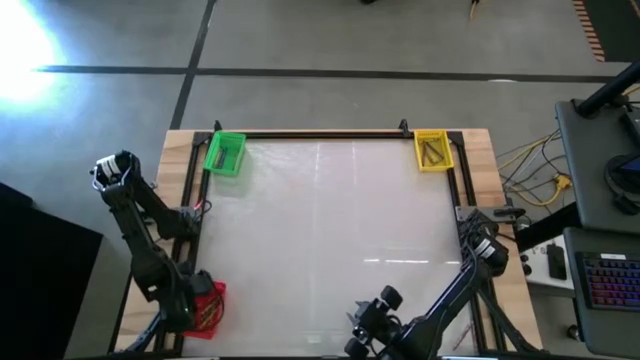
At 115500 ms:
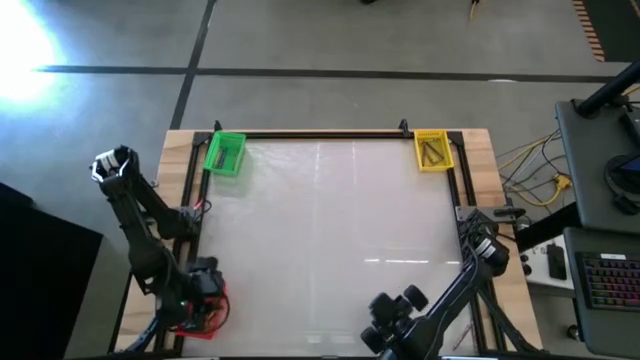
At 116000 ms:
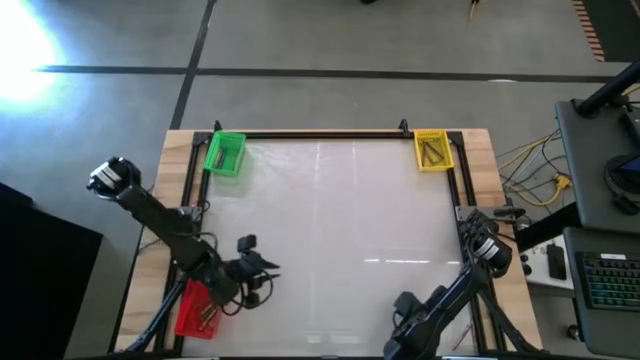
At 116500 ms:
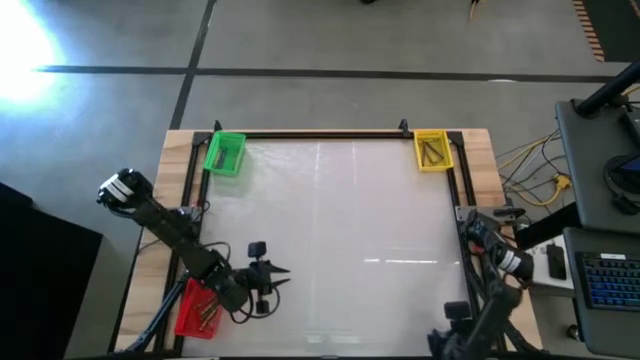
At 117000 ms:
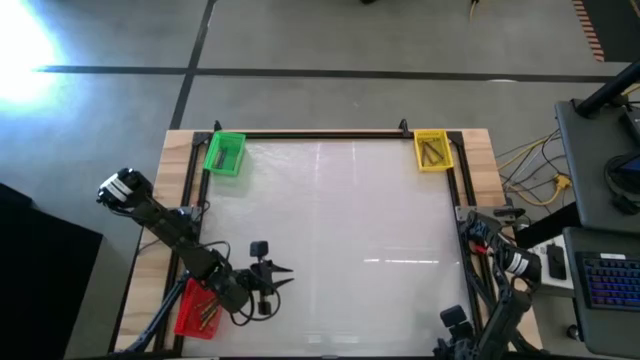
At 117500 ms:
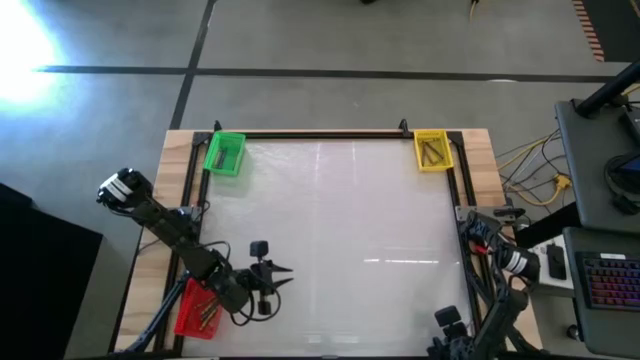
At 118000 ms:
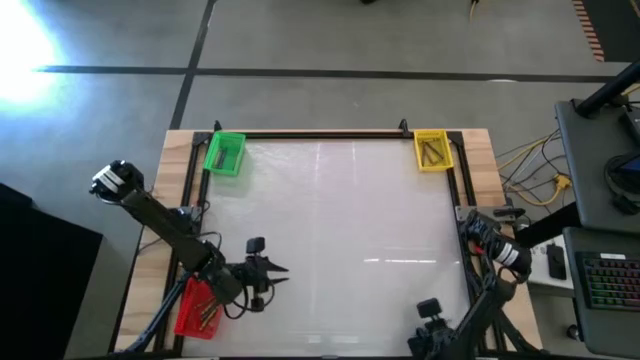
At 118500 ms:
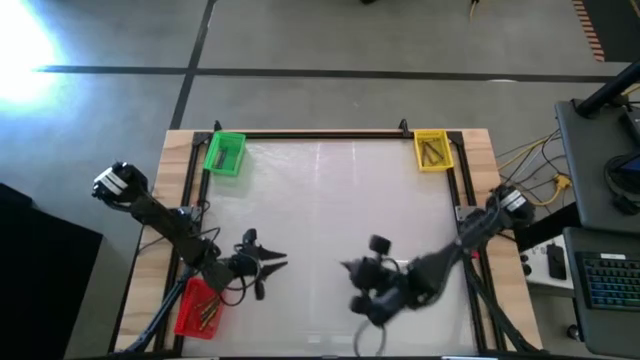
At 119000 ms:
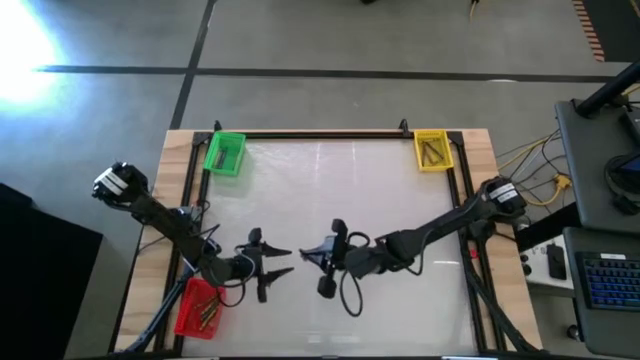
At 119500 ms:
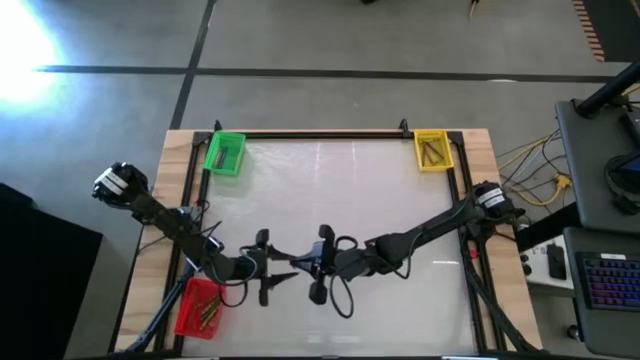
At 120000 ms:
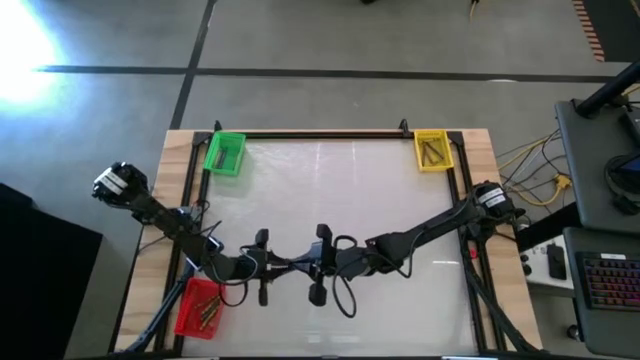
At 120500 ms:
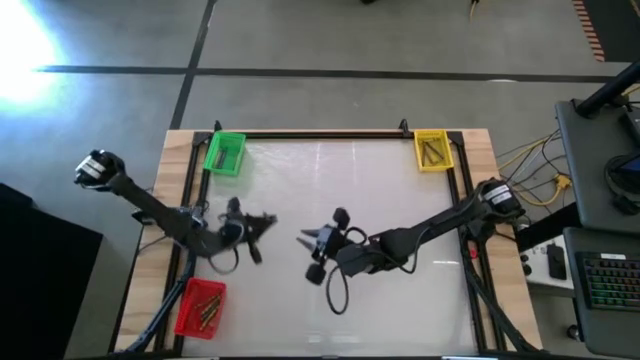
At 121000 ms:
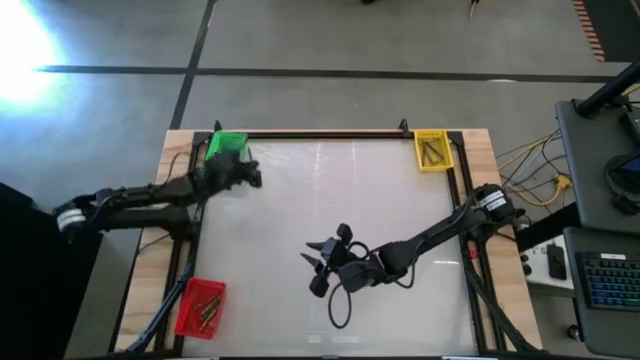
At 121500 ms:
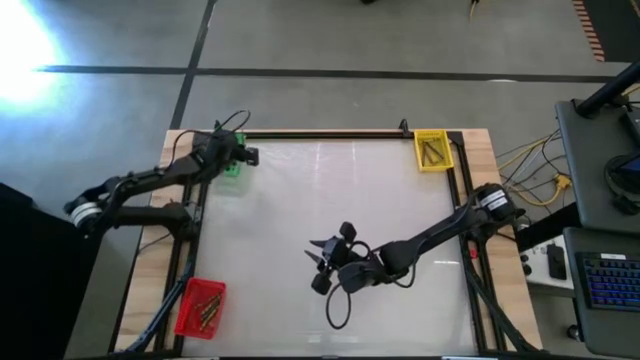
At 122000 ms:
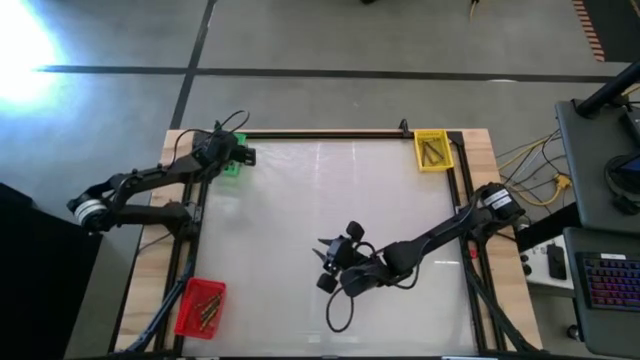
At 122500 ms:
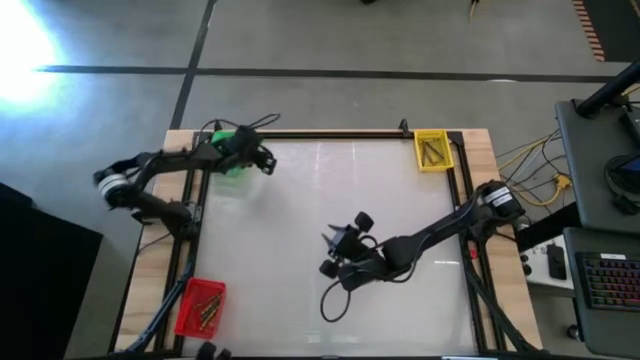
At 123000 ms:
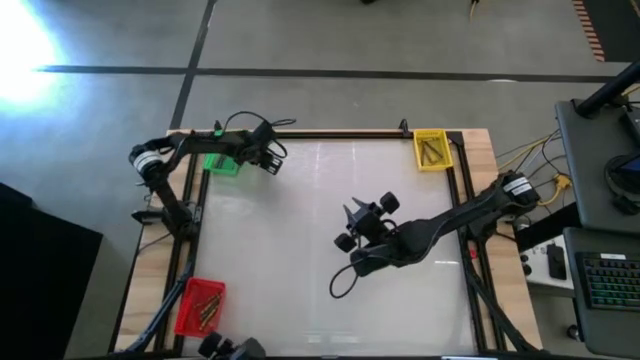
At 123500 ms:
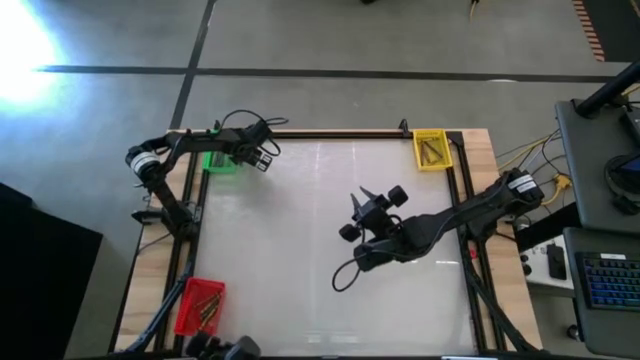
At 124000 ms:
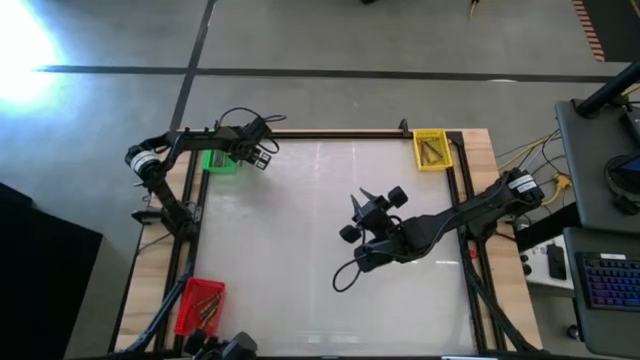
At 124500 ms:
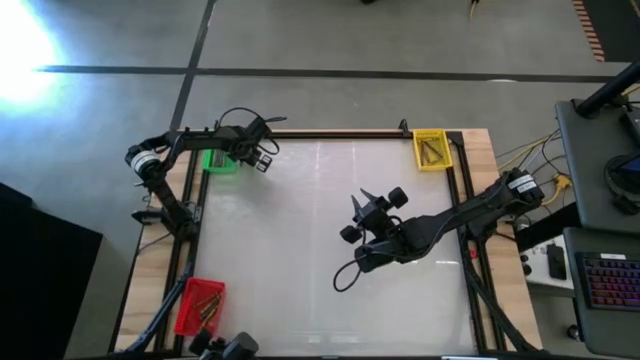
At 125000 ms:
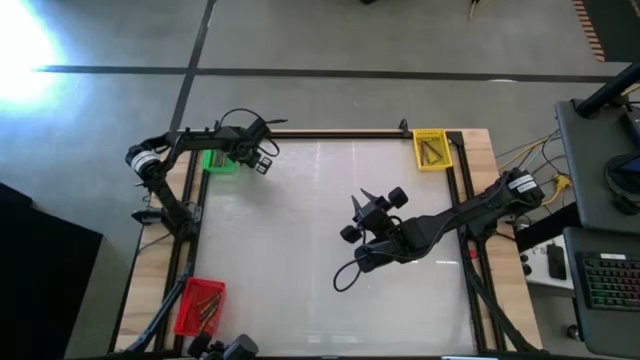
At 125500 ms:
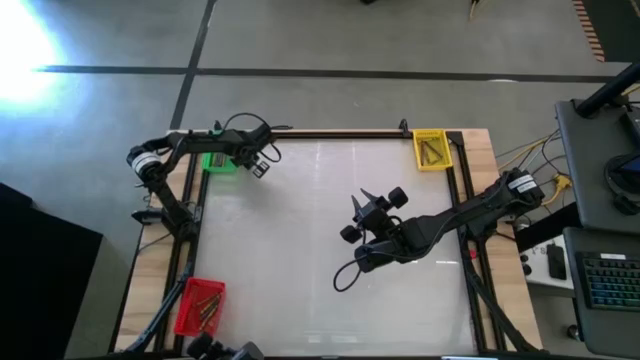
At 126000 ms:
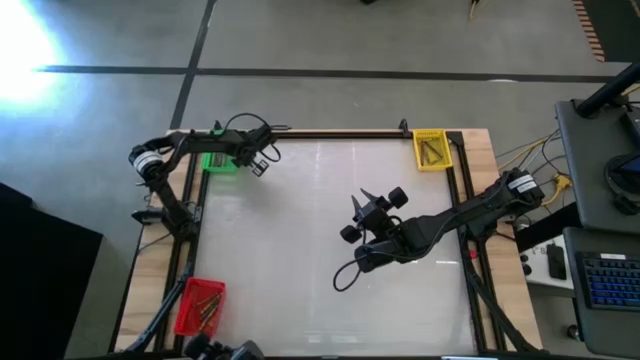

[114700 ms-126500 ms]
Task: Sort crayons
Put the brown crayon into the yellow basket

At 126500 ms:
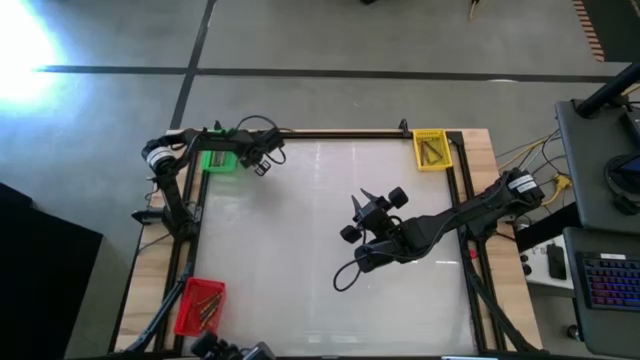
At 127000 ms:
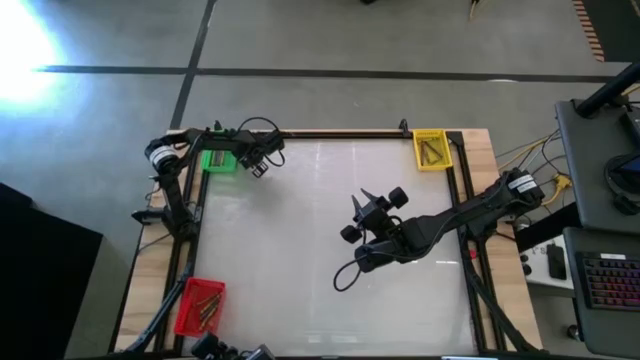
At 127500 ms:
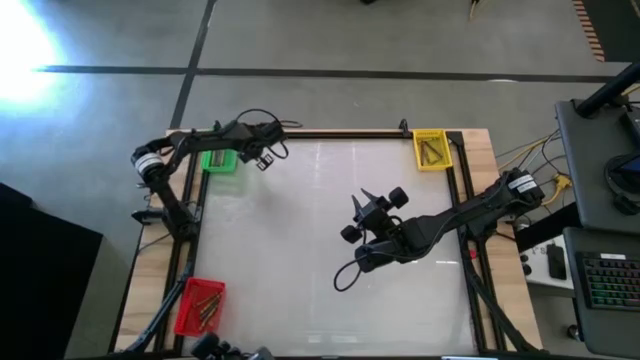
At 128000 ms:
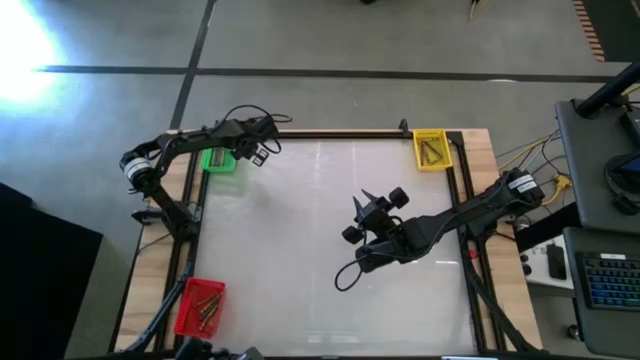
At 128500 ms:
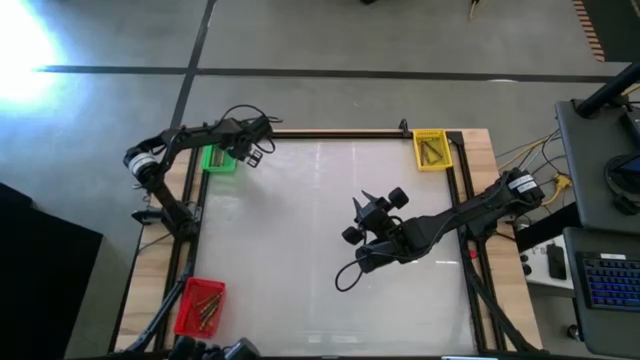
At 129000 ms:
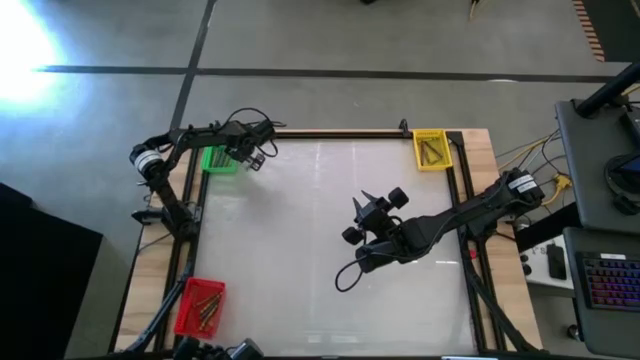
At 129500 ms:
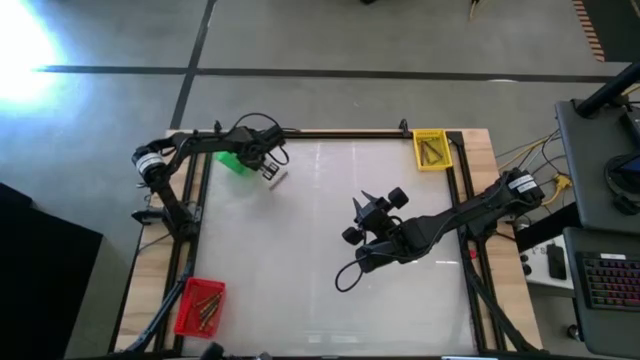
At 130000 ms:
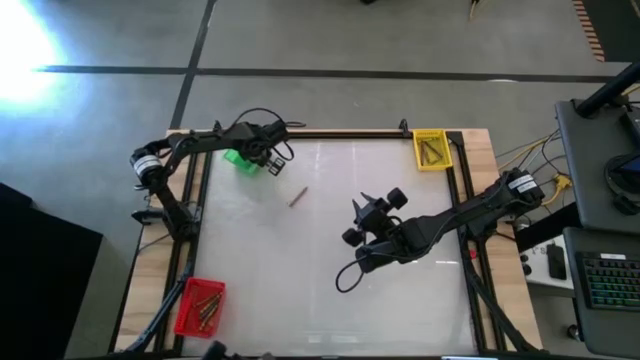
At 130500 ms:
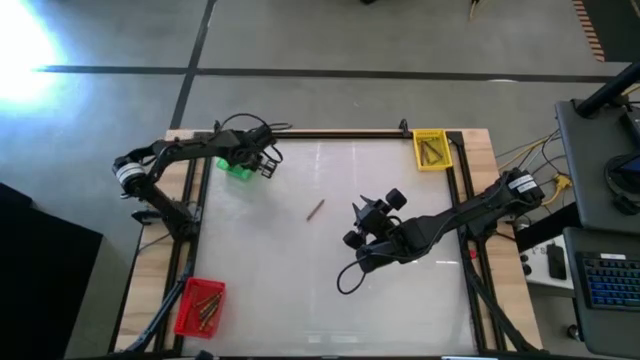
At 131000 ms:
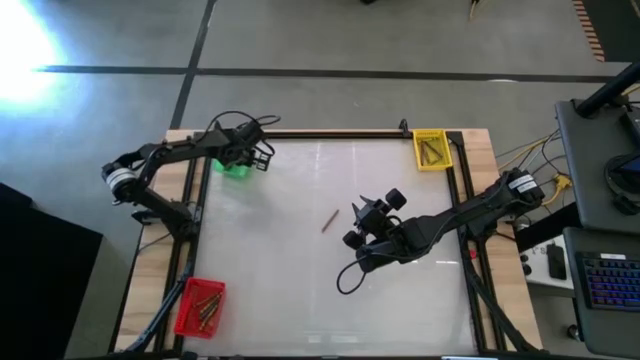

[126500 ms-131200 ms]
Adjust the green basket

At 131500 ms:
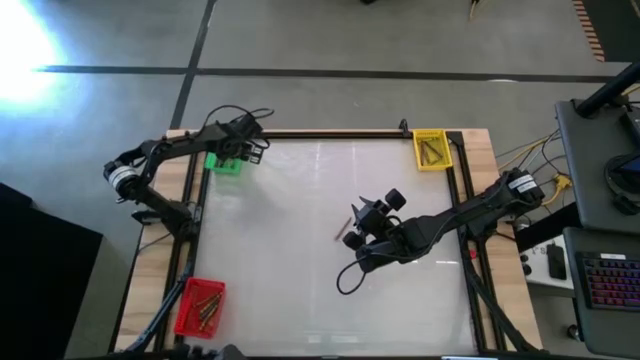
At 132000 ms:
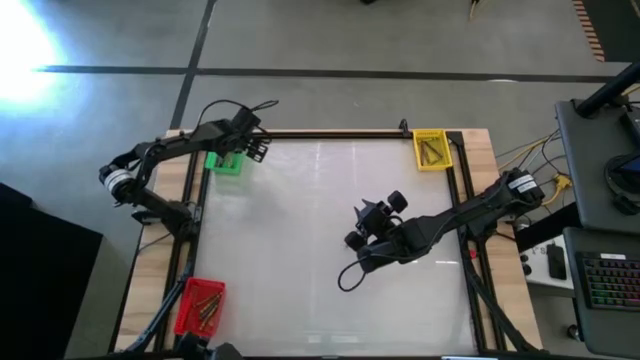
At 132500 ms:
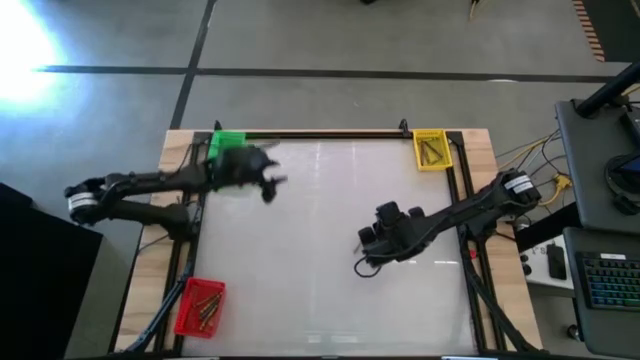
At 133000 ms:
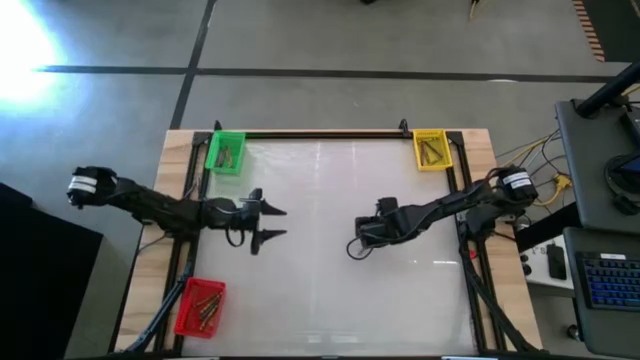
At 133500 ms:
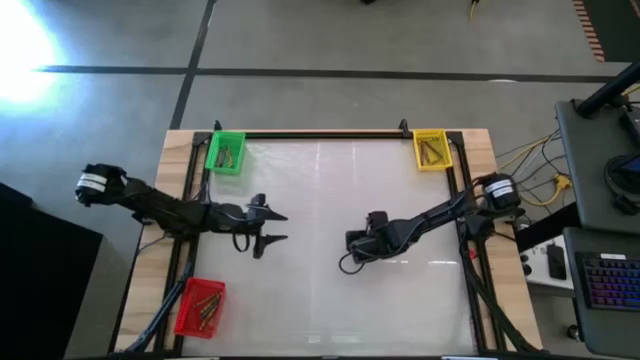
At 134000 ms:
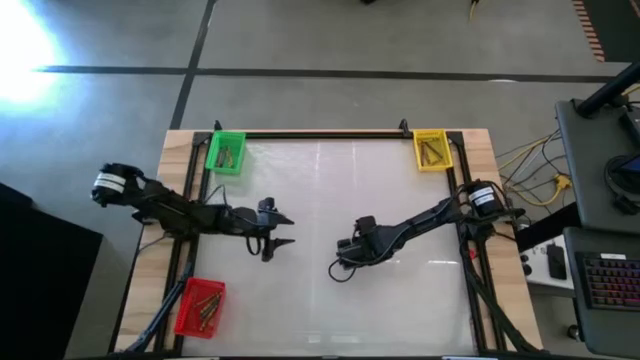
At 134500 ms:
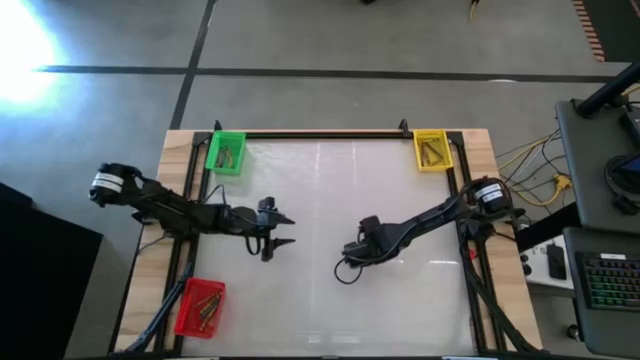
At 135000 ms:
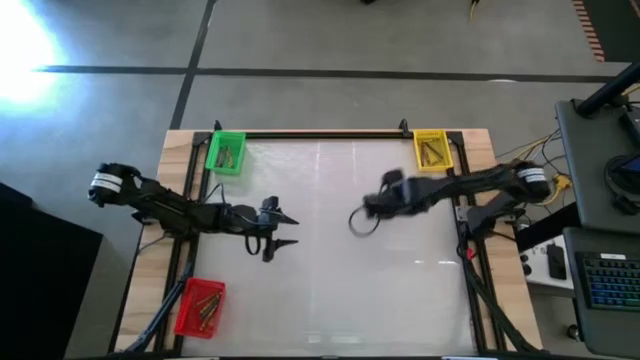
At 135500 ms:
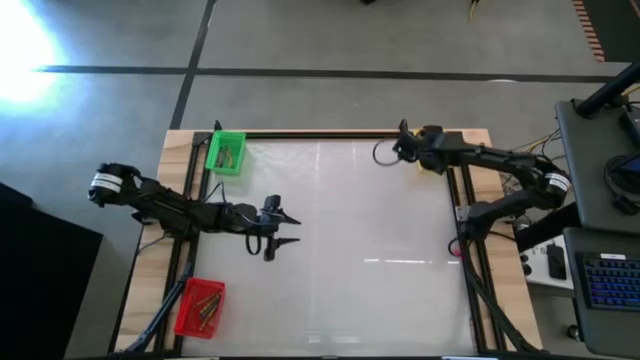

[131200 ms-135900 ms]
Put the brown crayon into the yellow basket
